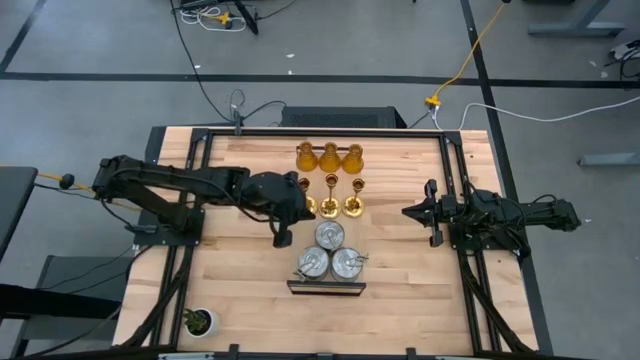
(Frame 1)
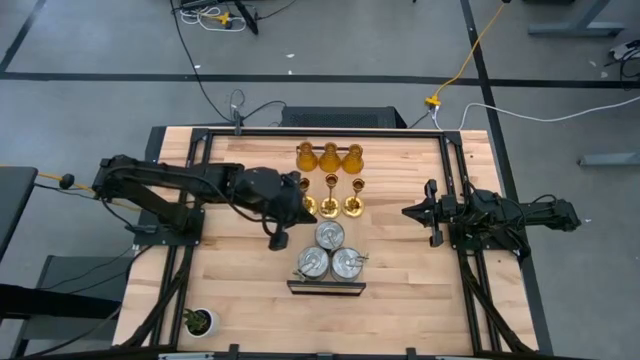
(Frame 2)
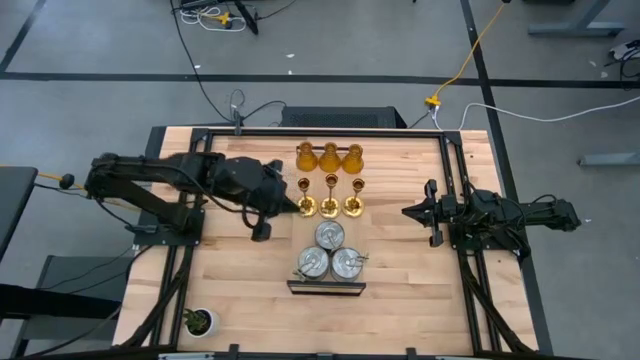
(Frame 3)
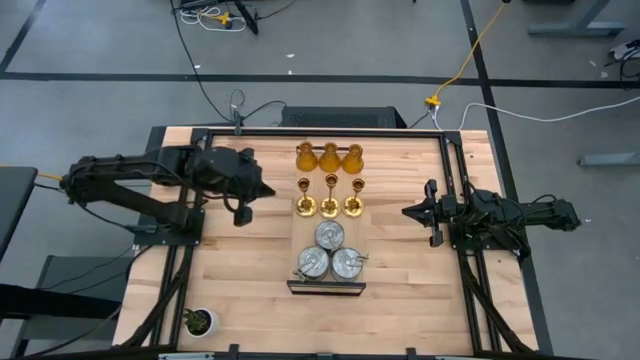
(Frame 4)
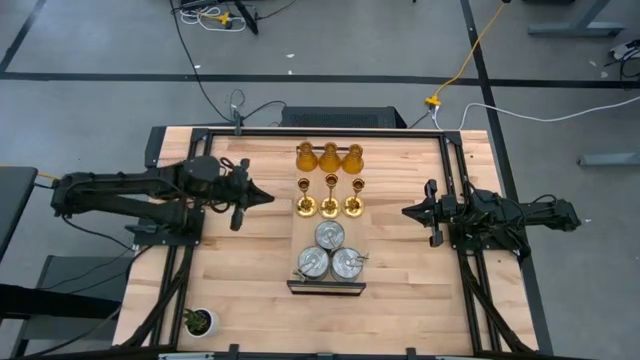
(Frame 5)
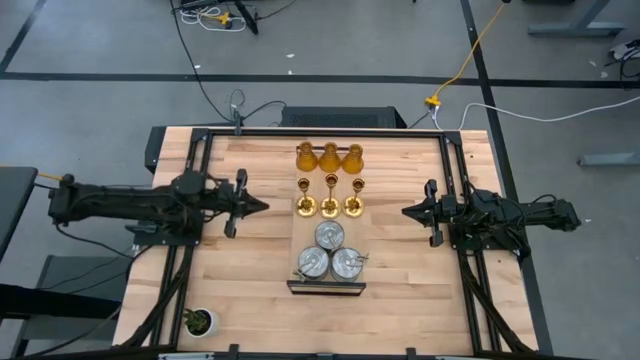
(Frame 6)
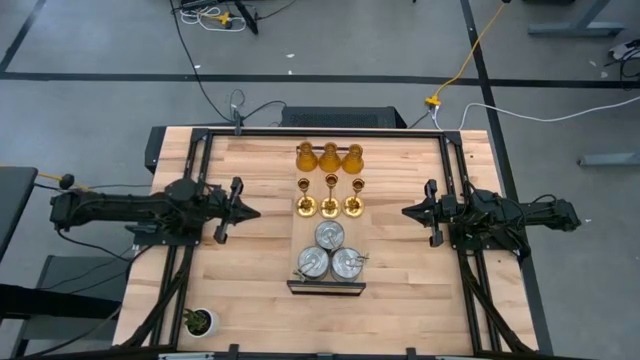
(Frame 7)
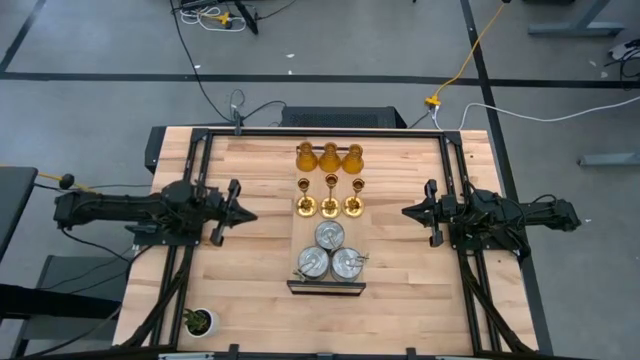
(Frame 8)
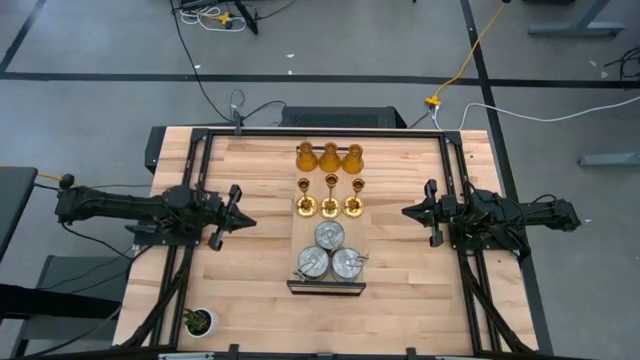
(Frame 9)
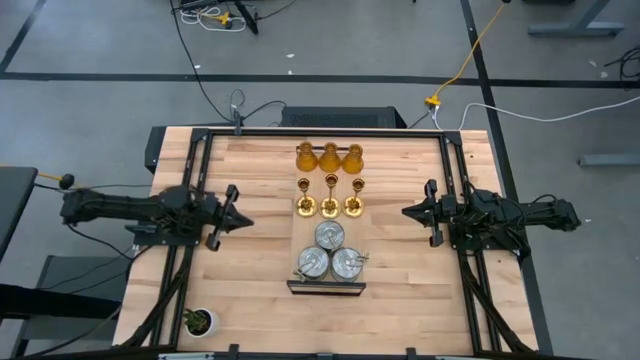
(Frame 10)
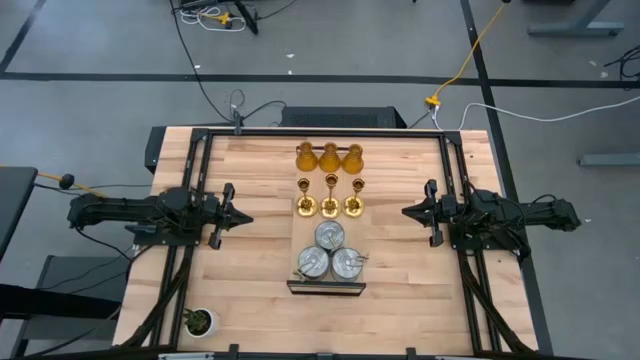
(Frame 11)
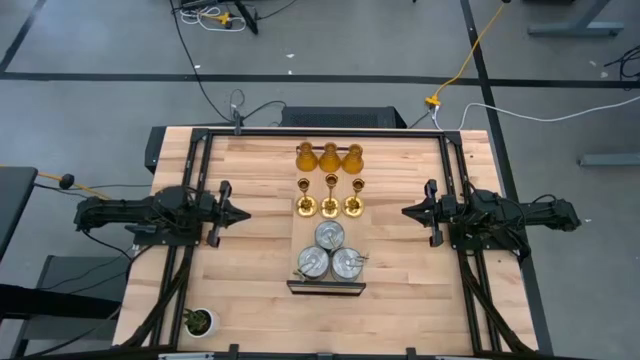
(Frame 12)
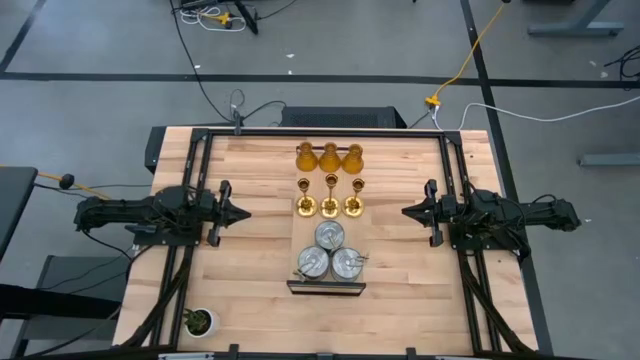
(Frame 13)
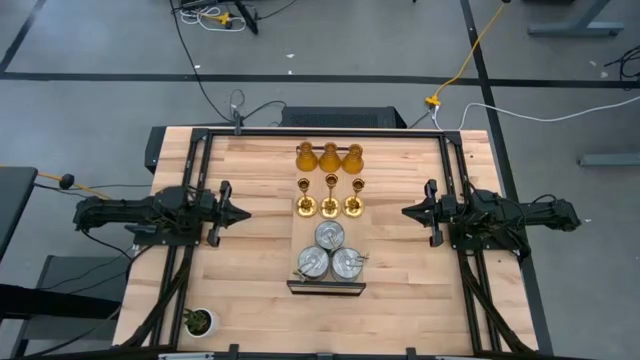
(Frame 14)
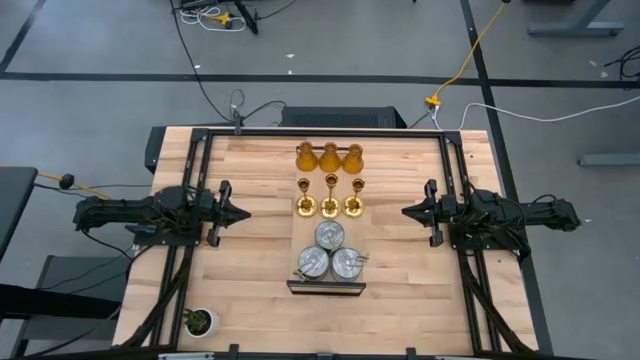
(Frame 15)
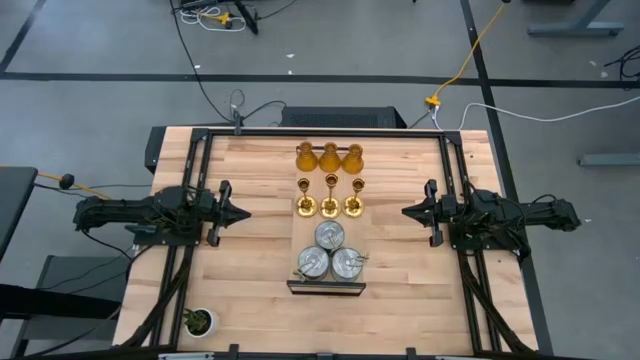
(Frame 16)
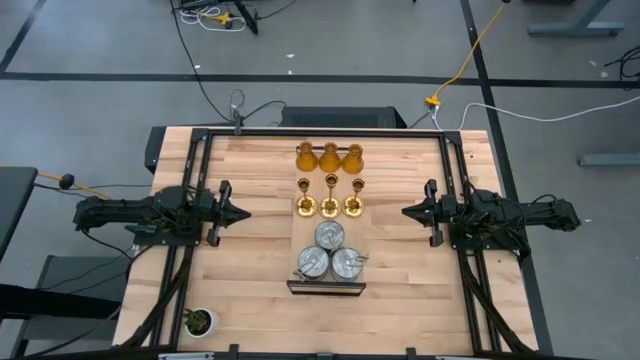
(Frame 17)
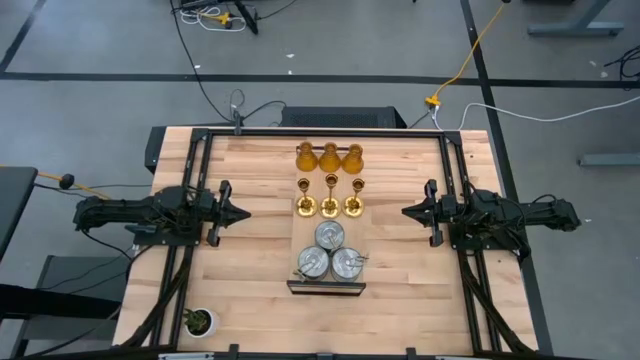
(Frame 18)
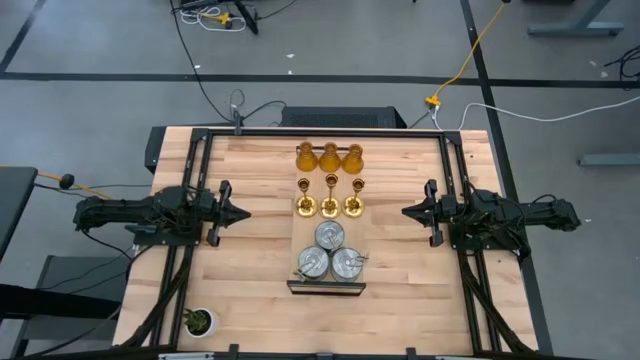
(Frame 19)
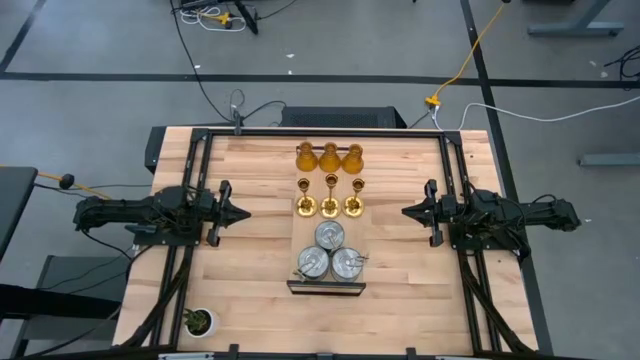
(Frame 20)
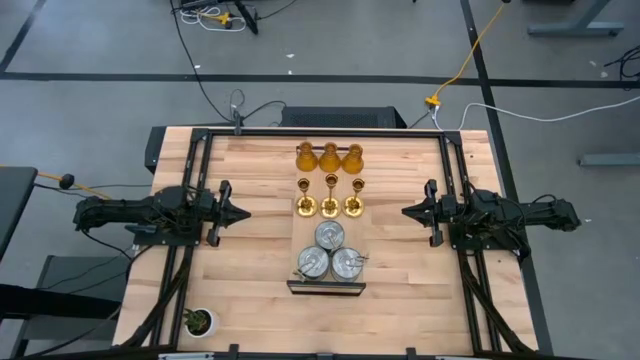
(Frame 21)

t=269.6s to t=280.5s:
Task: Pick & Place candle stick holders
Return to Home Position

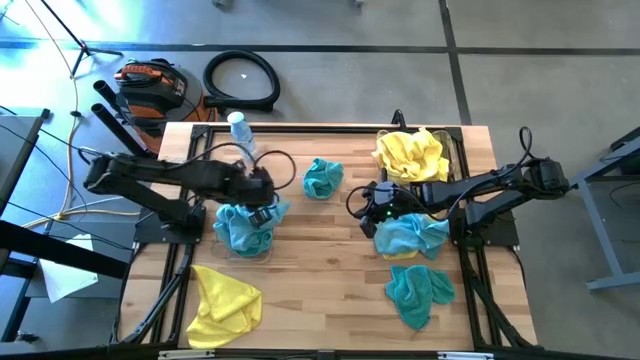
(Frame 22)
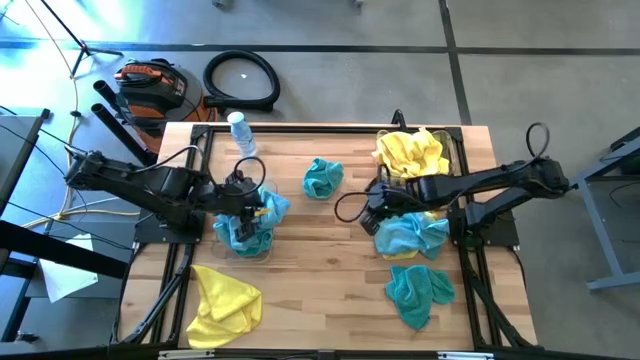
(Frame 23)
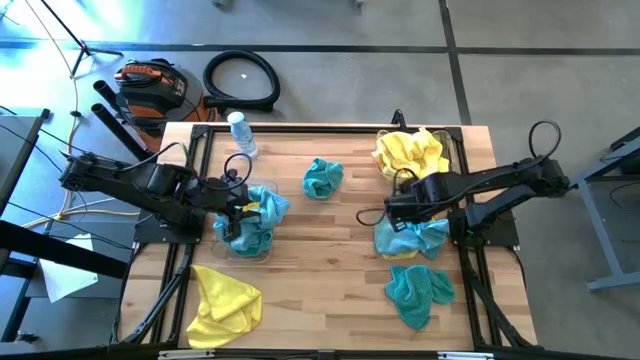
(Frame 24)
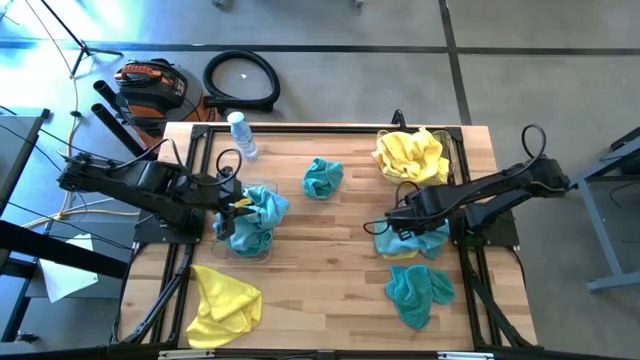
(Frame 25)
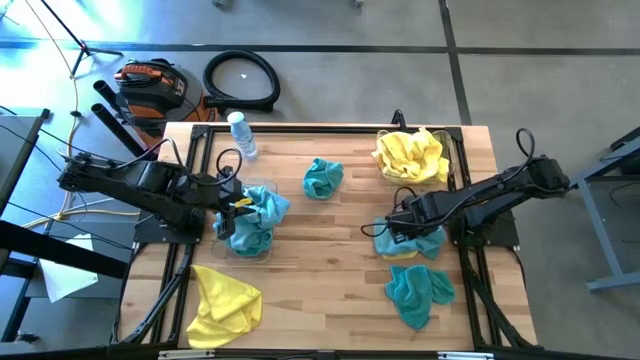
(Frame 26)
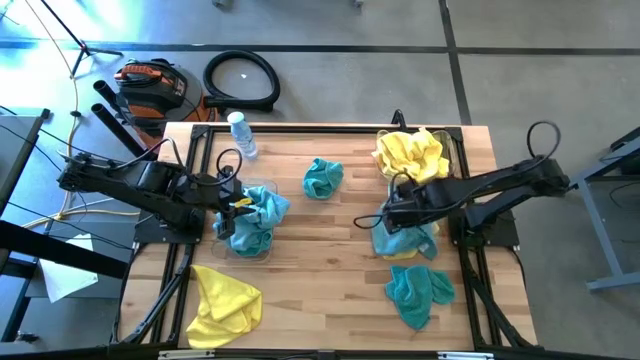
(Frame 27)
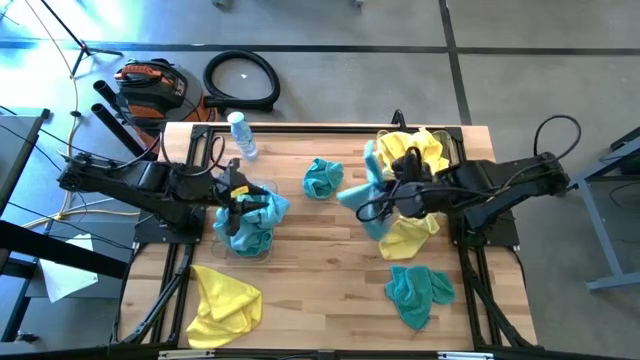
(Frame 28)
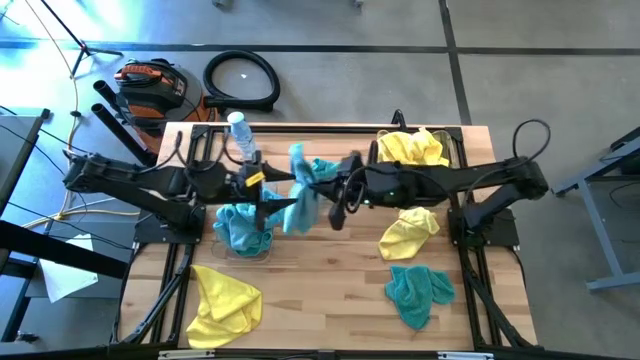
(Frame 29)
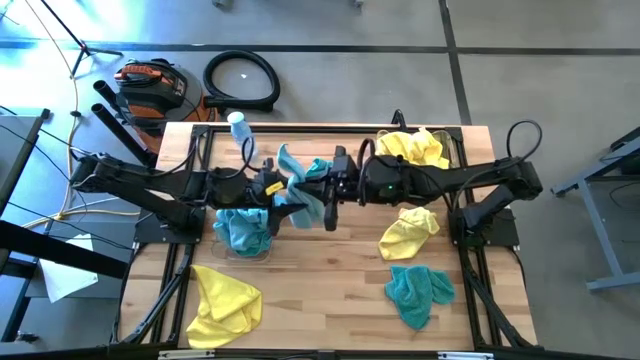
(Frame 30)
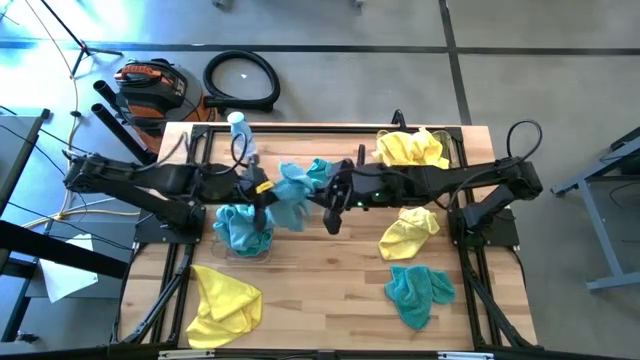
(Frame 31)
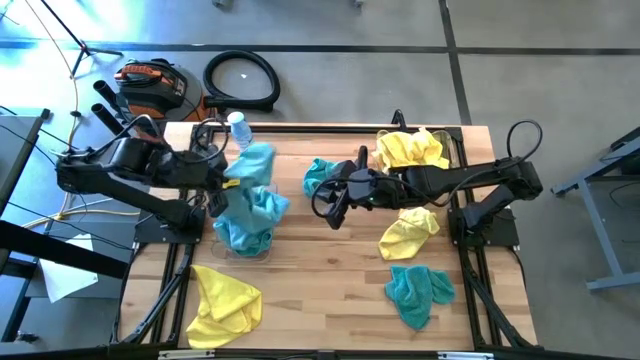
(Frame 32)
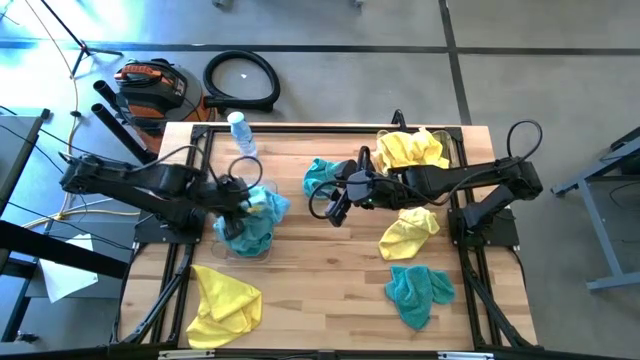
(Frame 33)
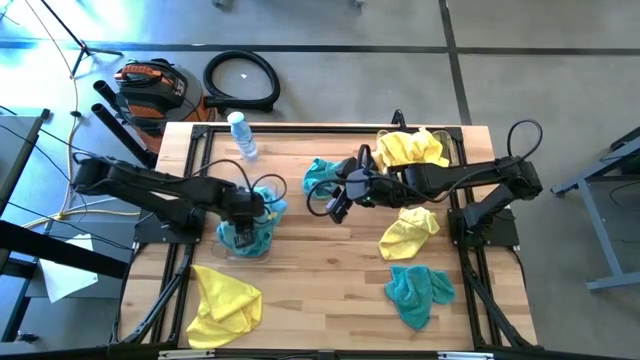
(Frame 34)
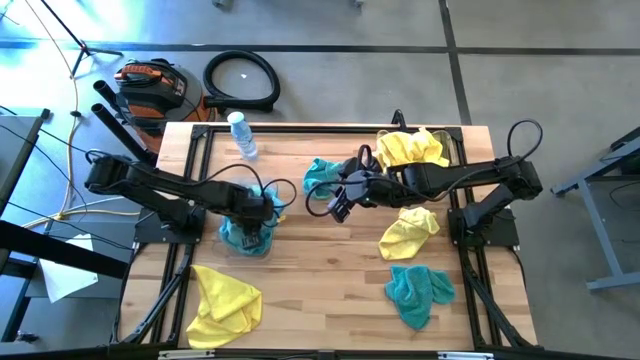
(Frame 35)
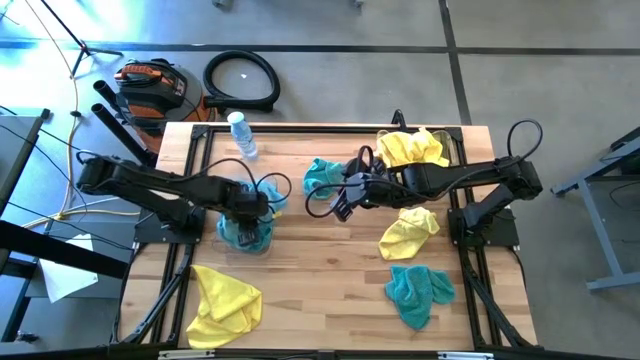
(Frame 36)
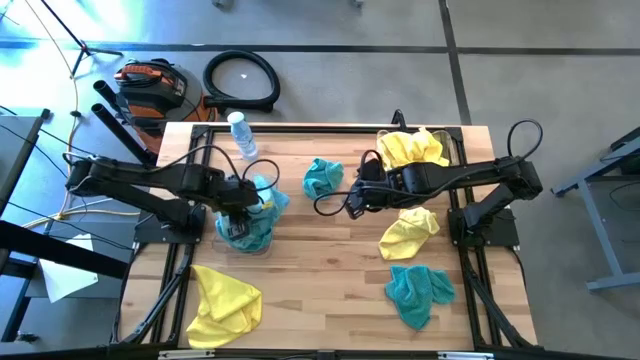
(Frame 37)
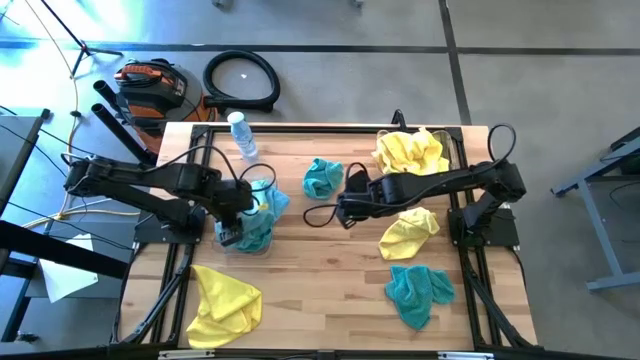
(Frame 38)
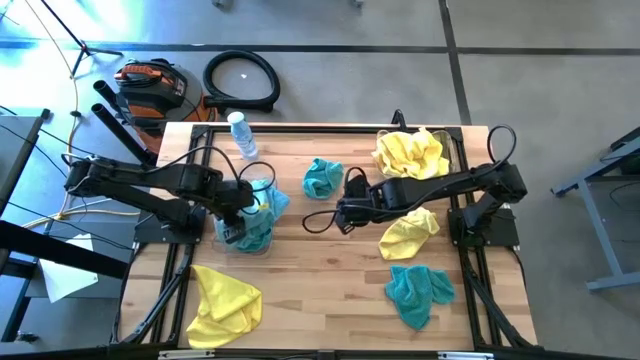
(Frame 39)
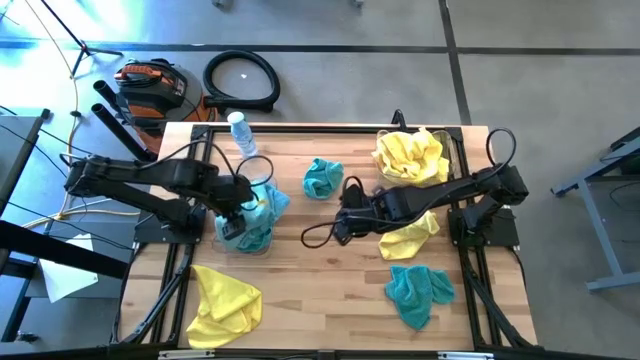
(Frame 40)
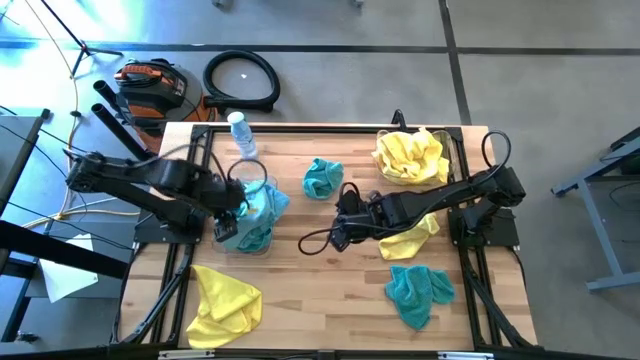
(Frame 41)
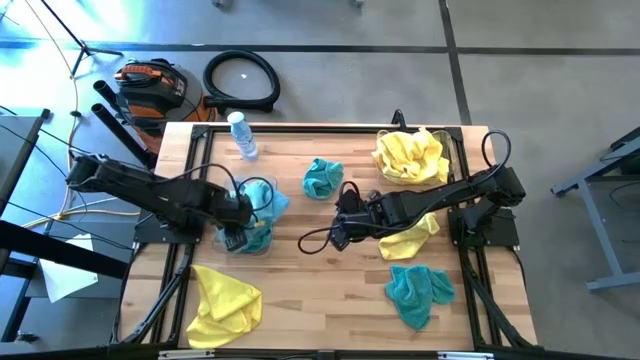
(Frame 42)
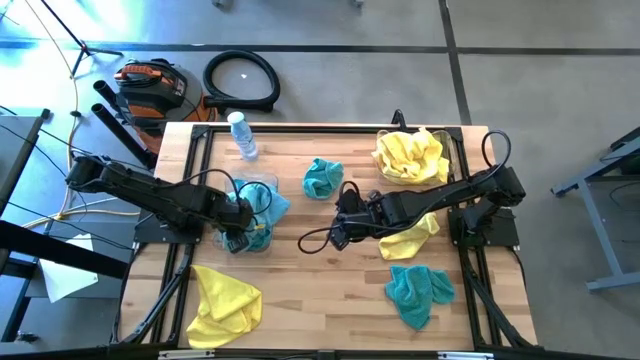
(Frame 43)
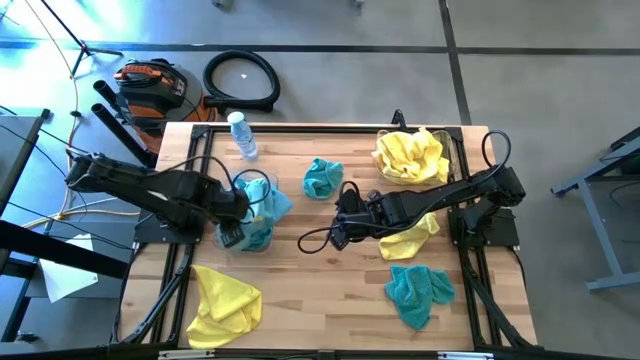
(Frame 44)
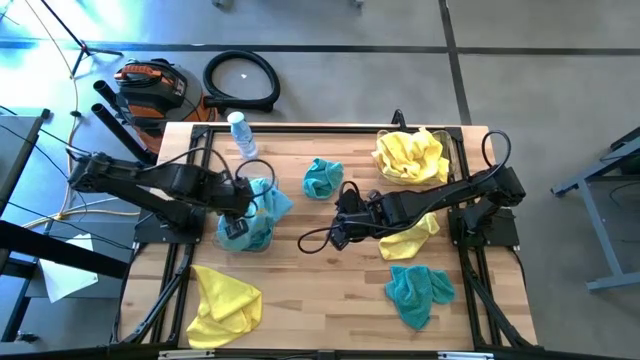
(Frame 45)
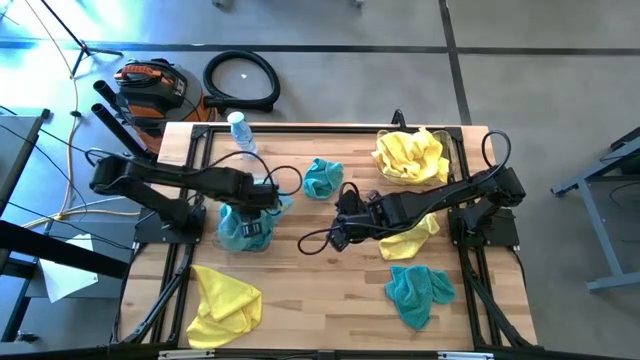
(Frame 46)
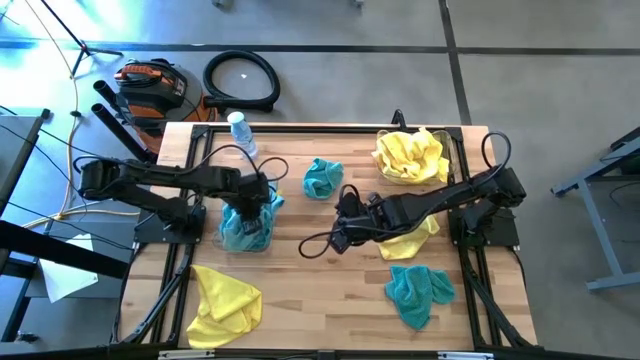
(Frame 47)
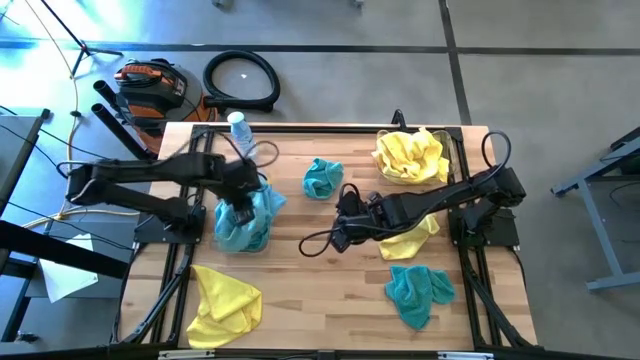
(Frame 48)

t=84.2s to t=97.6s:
Task: Sort microfiber towel by color & place in baskets
Put the blue microfiber cloth into the left transparent bin
